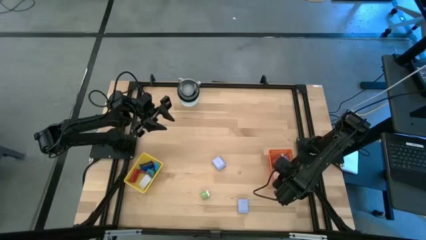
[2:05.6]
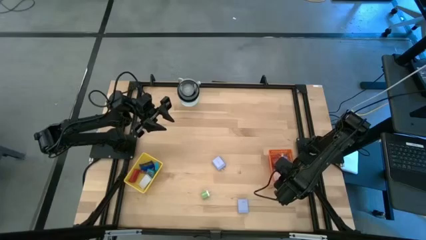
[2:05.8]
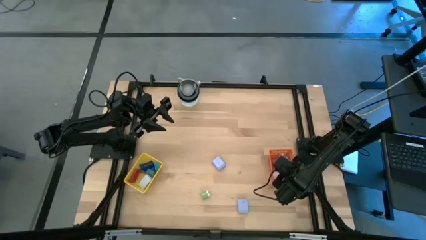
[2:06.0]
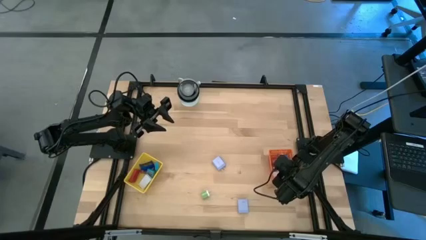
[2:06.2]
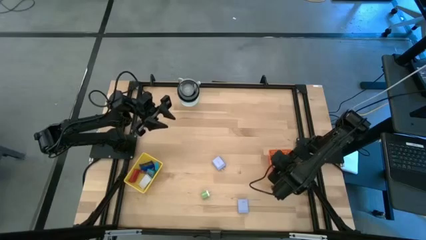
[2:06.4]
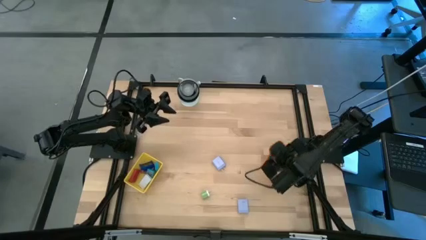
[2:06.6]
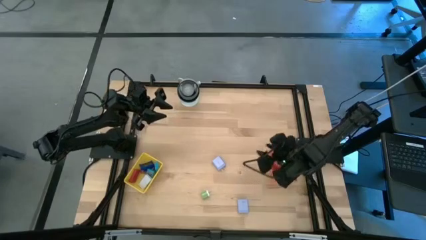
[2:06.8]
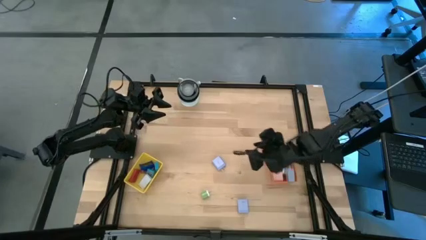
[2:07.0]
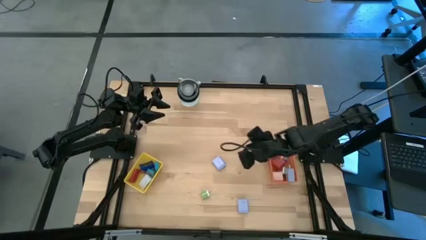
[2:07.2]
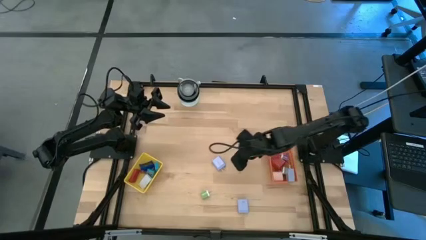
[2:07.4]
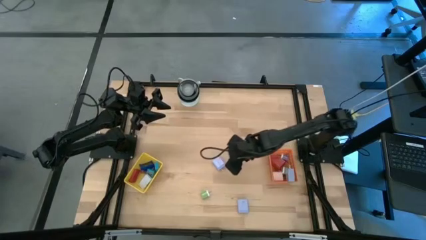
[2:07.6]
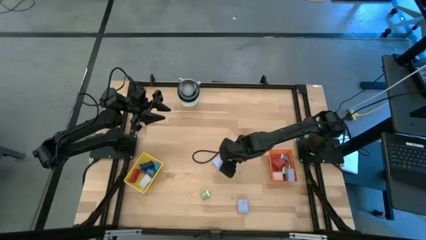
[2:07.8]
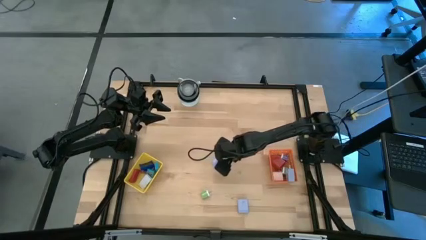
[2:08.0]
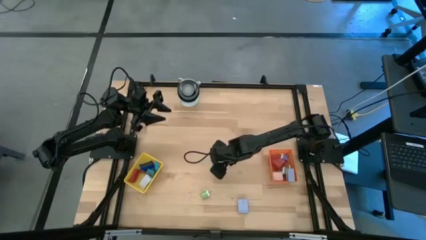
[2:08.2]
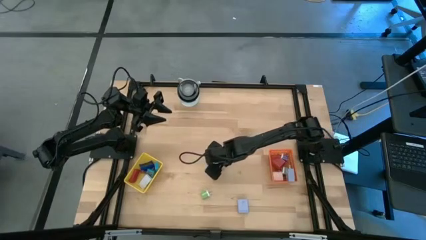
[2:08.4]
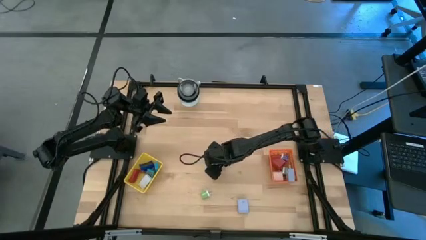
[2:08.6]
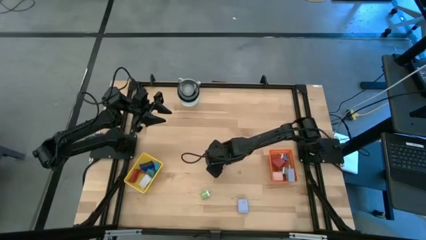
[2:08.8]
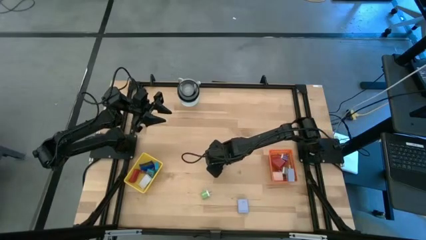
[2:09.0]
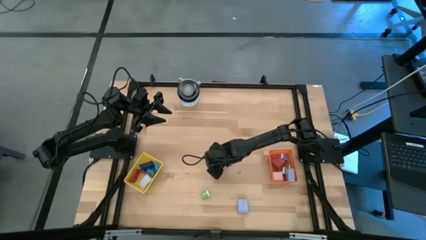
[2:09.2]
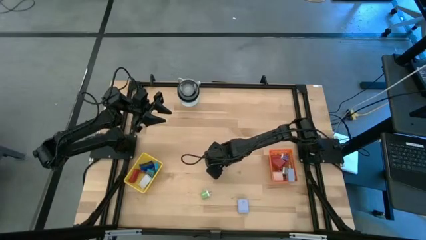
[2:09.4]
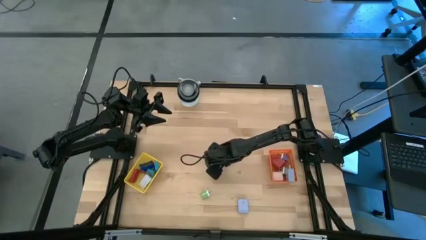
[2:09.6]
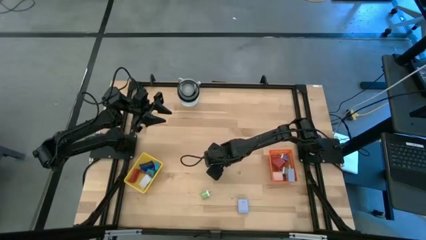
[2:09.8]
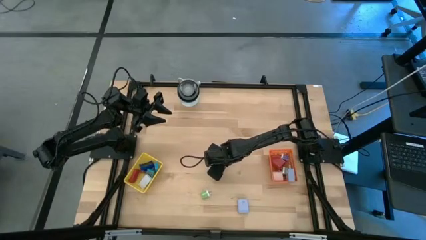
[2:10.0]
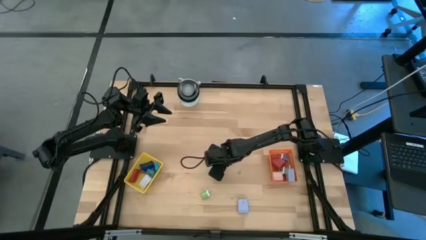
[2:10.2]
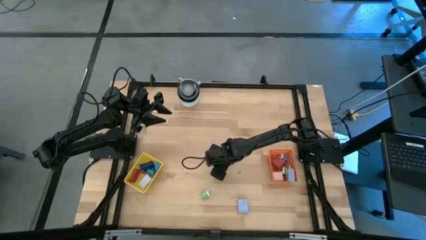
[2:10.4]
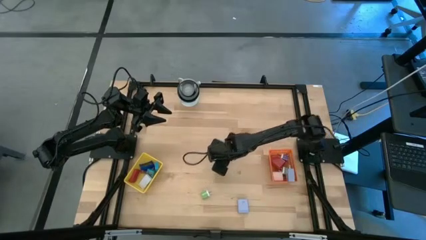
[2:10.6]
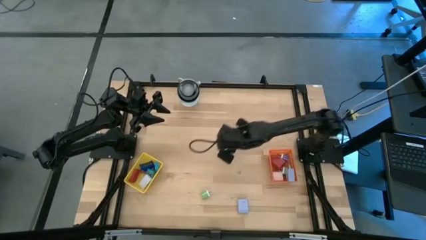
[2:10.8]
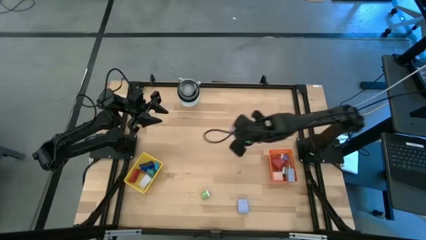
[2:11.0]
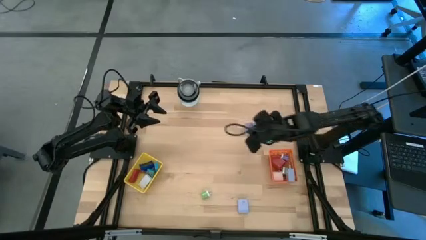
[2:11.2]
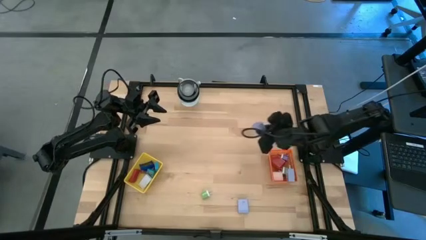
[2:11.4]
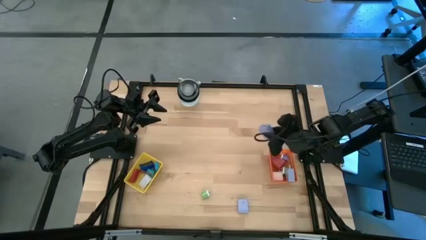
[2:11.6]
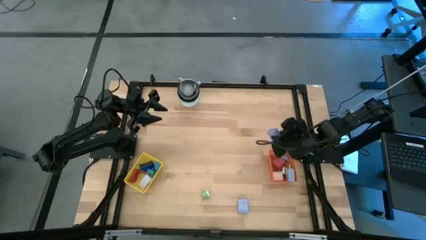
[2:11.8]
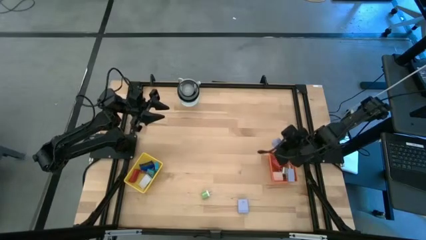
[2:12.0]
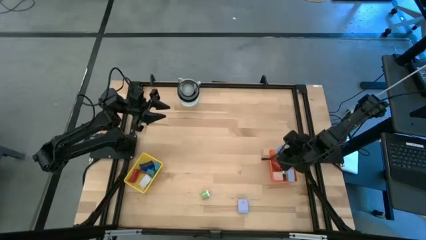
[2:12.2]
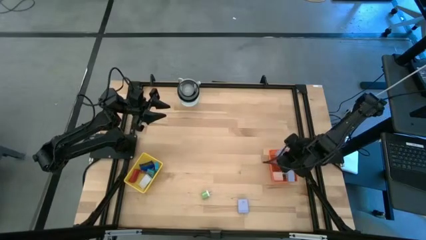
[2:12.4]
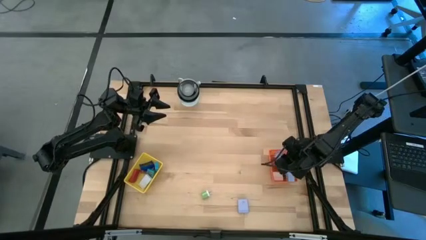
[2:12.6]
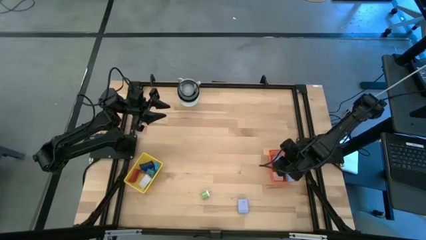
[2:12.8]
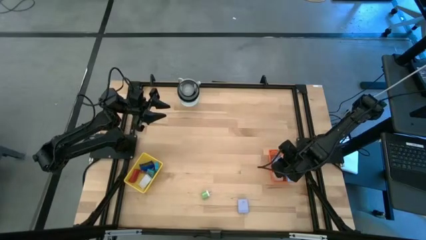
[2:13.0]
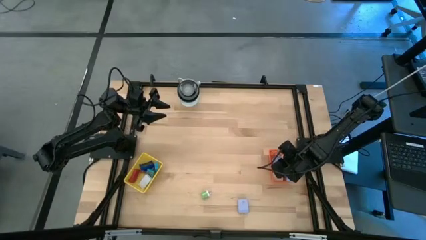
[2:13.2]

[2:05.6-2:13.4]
Task: Pick & Place Office items
Put the top white charger adapter into the orange basket

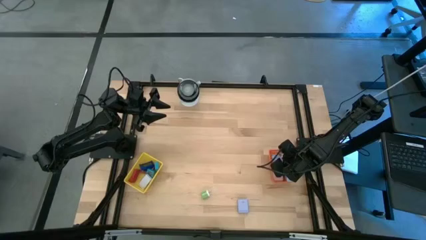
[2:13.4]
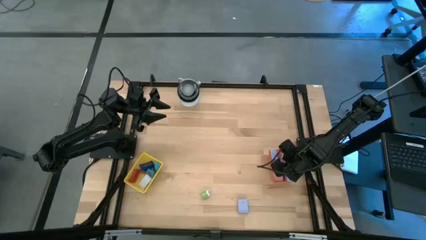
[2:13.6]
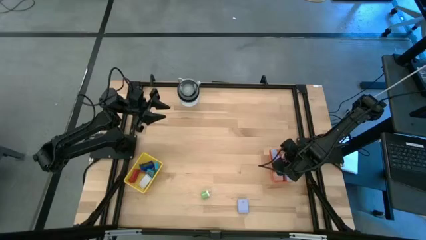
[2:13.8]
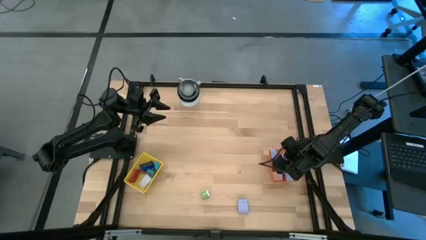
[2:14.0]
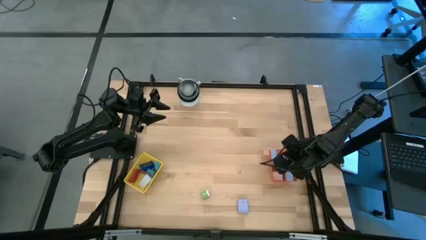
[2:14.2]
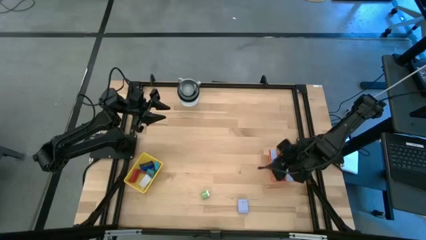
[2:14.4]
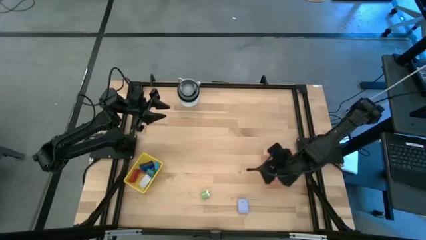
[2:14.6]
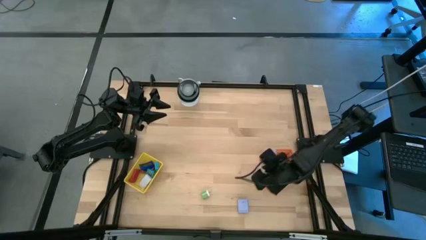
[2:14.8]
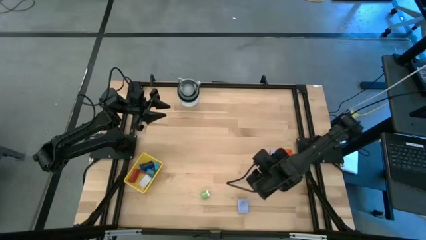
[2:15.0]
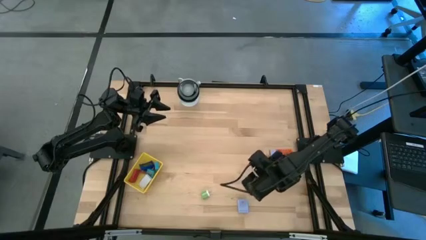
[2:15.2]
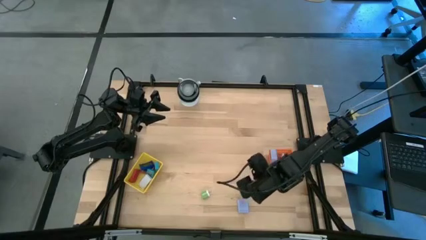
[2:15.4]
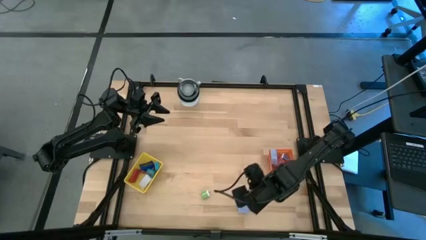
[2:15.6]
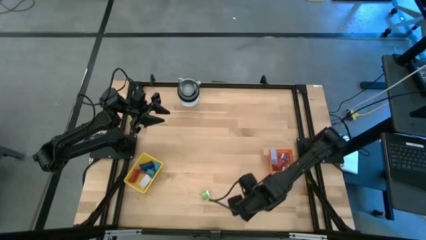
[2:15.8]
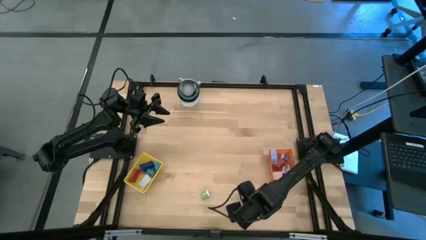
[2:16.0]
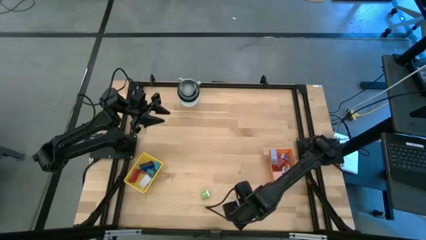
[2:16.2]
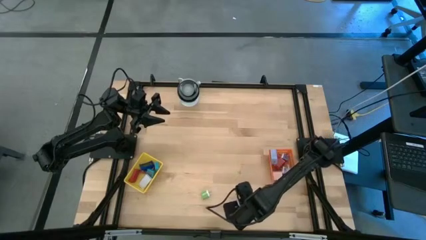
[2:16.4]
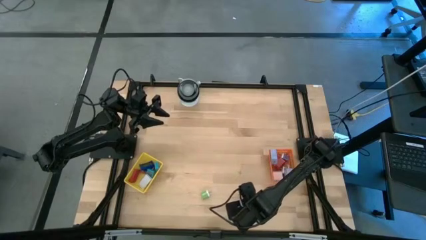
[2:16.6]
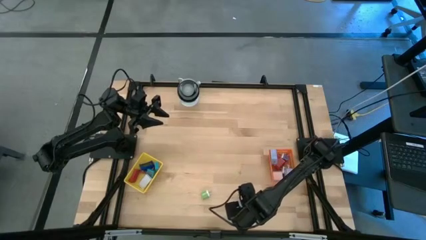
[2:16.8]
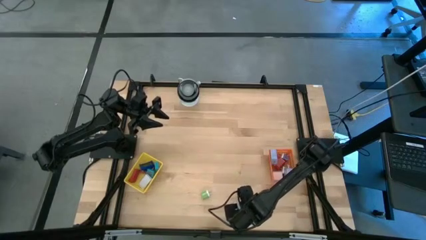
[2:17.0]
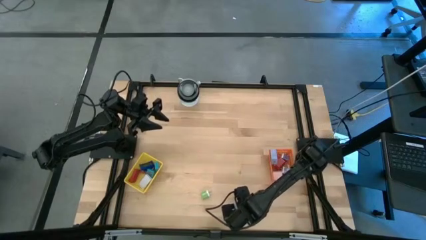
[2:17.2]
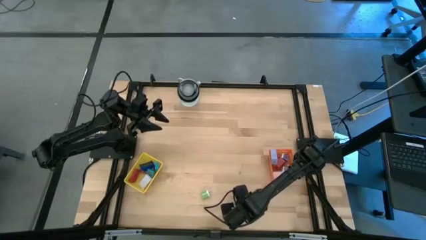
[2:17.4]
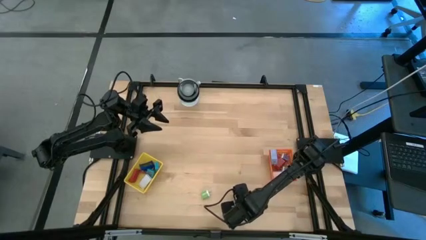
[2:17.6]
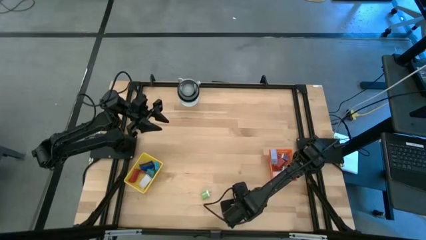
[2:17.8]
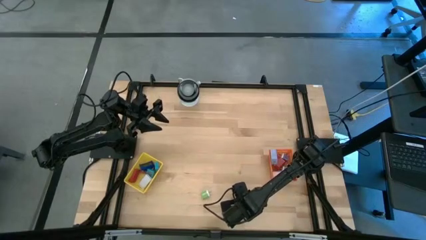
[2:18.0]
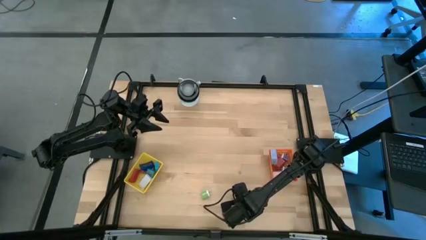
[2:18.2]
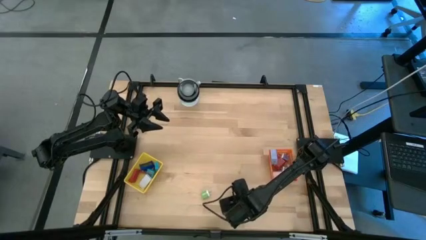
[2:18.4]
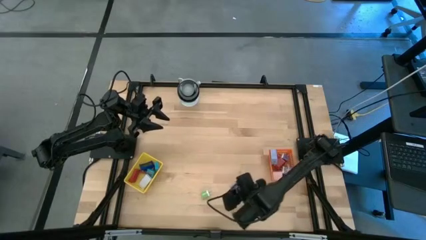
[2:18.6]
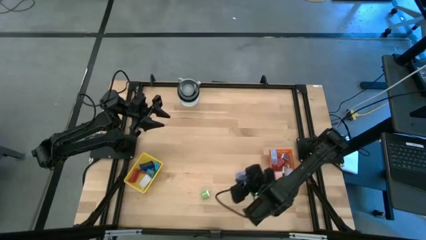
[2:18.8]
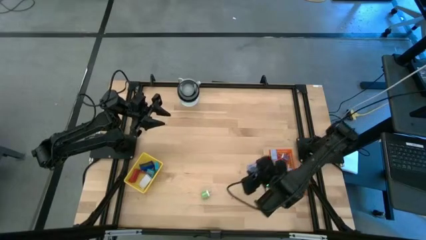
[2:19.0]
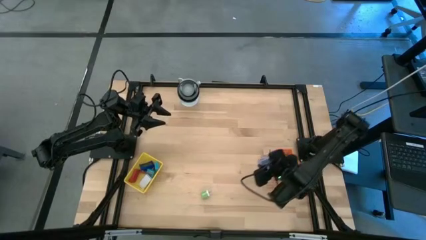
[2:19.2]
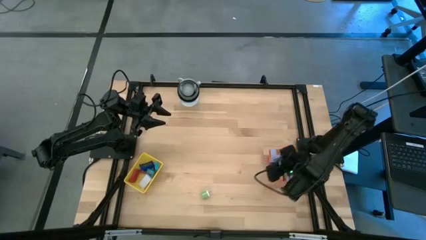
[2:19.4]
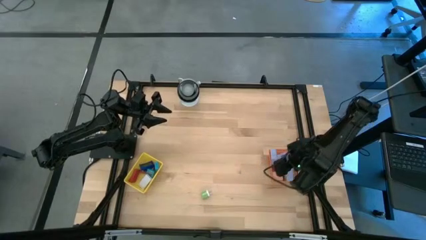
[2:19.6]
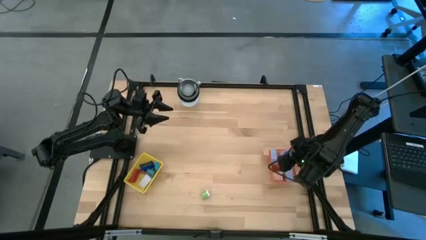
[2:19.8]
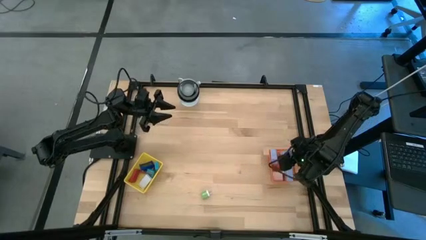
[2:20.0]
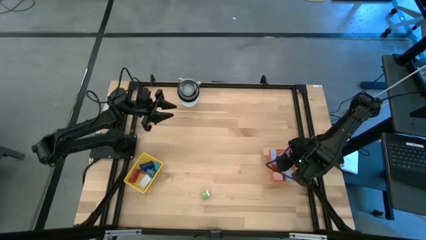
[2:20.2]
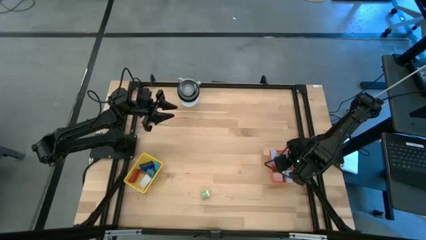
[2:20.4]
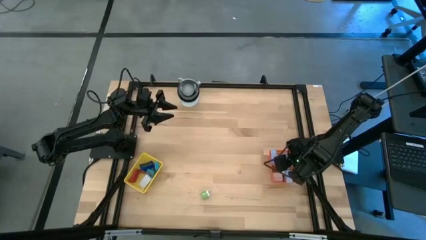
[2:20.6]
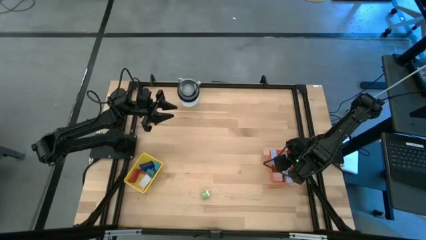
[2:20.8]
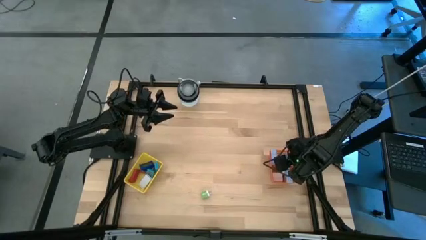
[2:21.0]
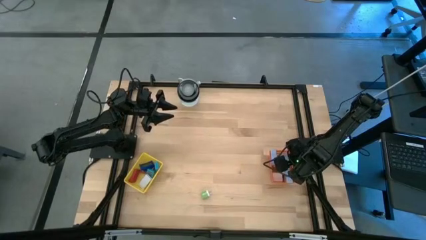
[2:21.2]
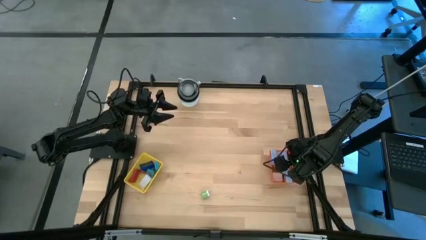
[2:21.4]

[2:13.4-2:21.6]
Put the white charger adapter into the orange basket

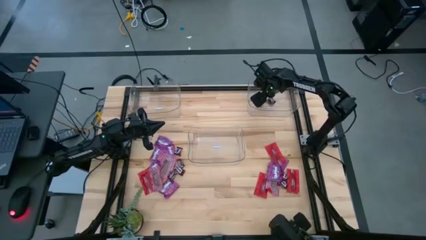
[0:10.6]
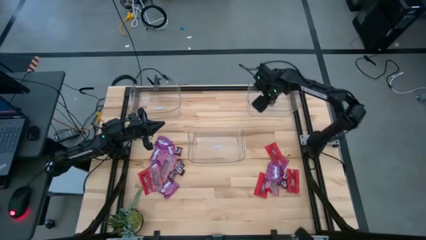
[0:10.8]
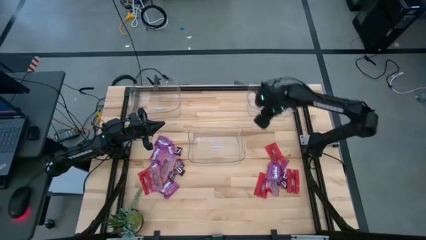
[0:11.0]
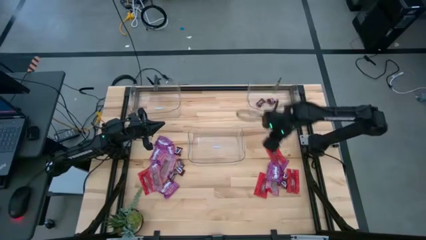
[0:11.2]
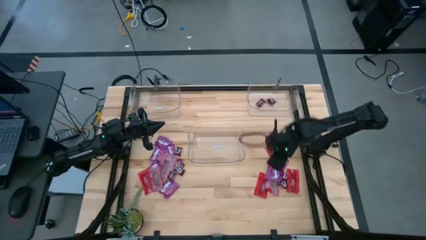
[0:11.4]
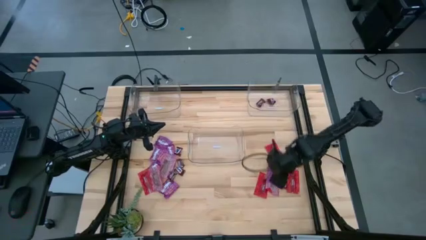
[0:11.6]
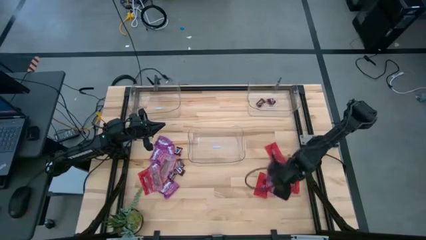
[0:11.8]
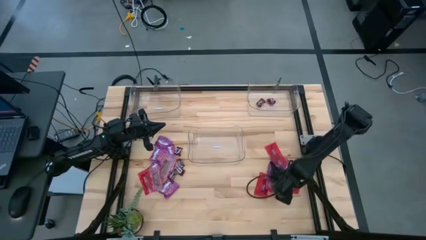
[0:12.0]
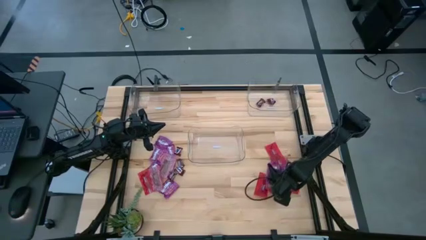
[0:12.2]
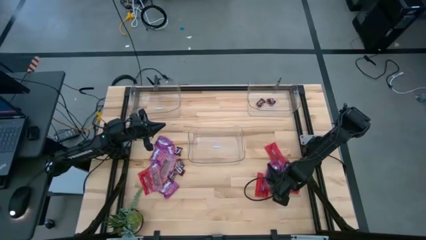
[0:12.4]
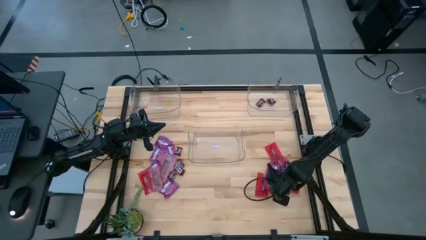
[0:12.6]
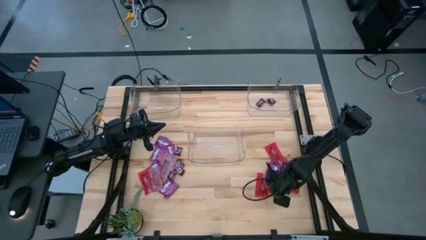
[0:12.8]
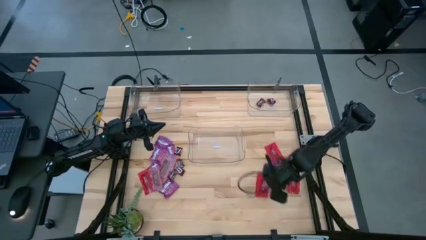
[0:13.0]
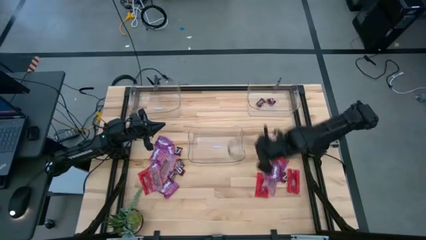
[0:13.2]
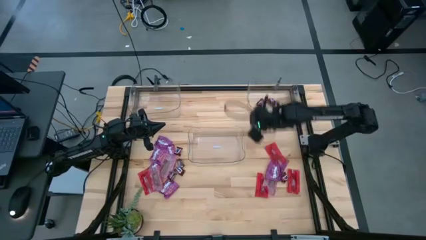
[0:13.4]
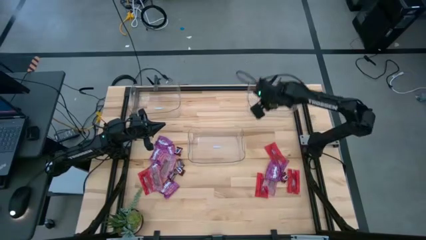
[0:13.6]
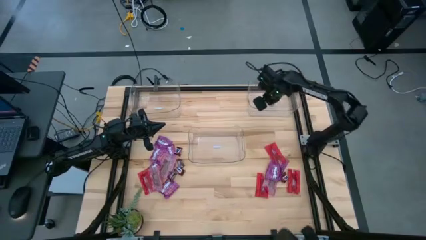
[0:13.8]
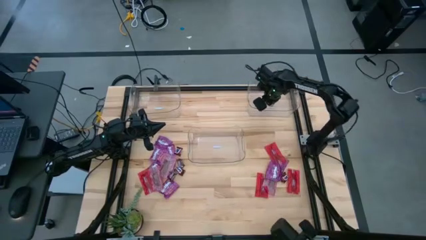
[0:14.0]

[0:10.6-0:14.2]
Task: Sort candy
Put the brown chocolate bar into the top right transparent bin
